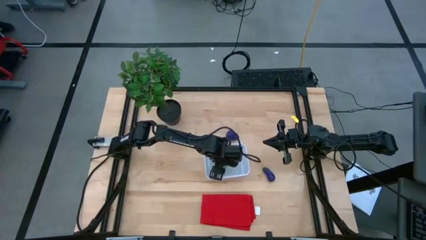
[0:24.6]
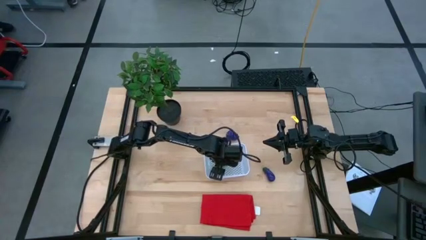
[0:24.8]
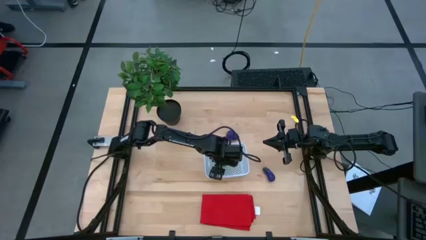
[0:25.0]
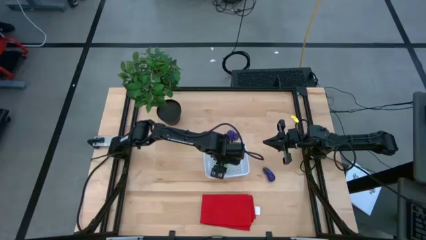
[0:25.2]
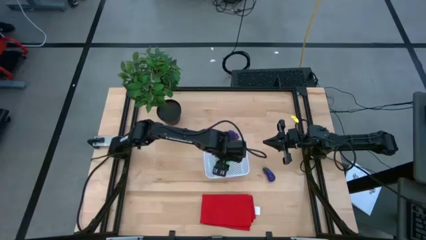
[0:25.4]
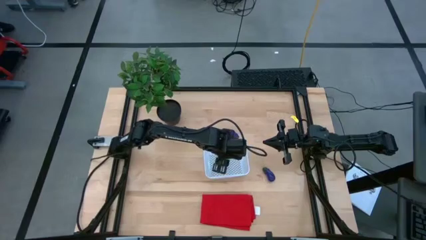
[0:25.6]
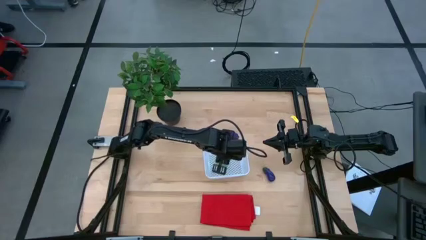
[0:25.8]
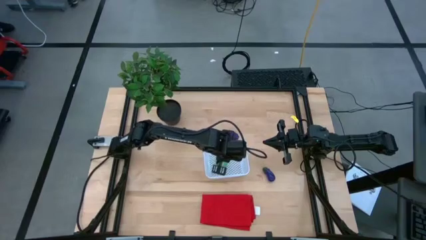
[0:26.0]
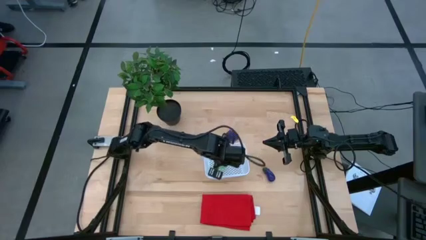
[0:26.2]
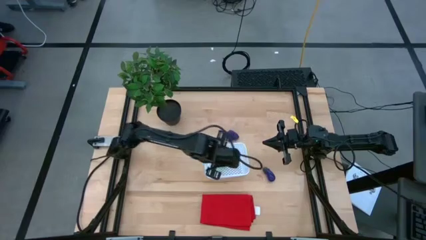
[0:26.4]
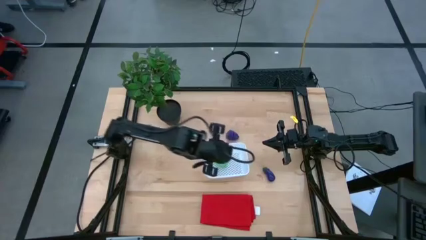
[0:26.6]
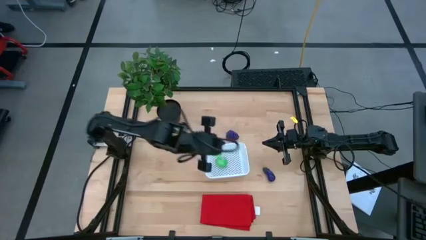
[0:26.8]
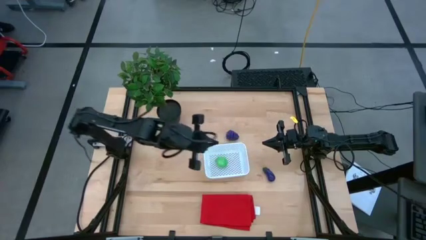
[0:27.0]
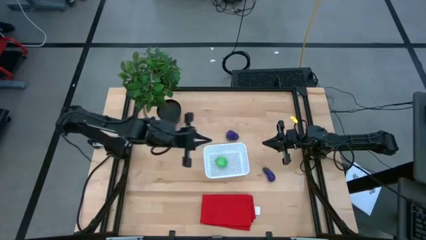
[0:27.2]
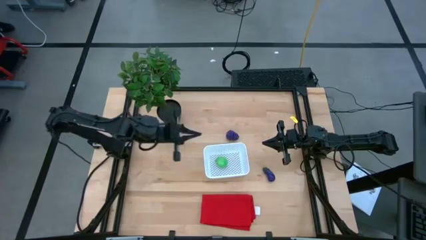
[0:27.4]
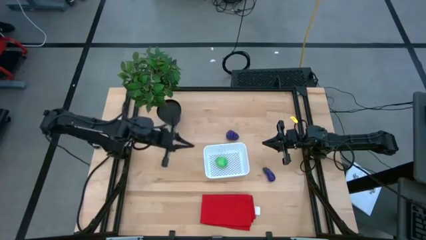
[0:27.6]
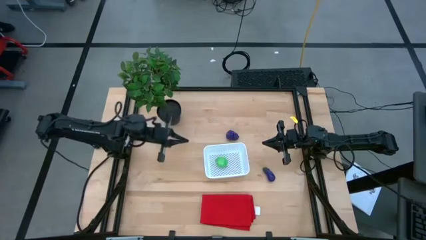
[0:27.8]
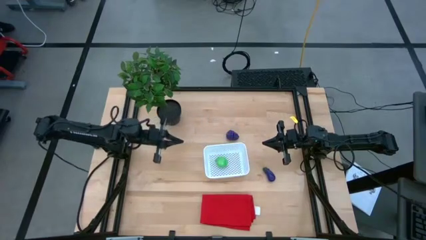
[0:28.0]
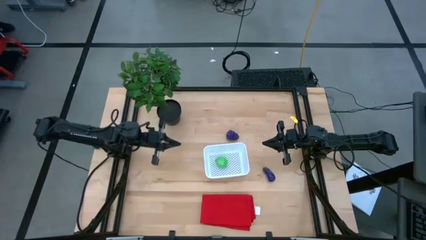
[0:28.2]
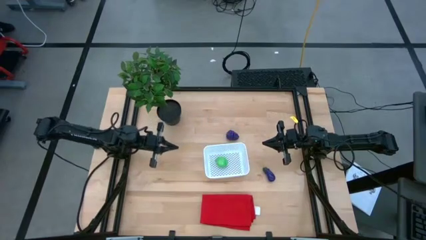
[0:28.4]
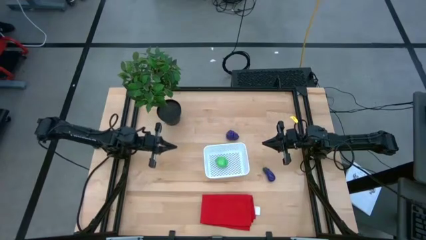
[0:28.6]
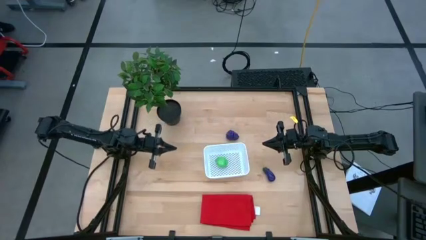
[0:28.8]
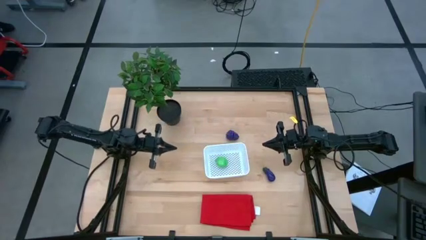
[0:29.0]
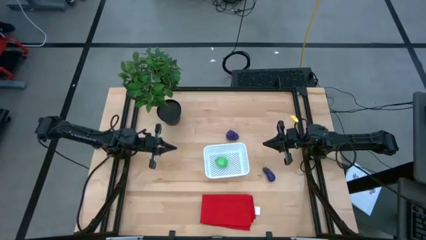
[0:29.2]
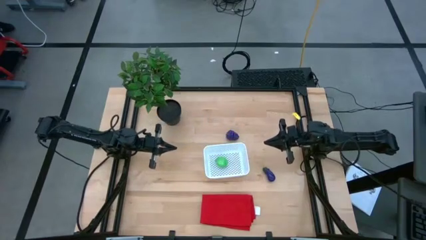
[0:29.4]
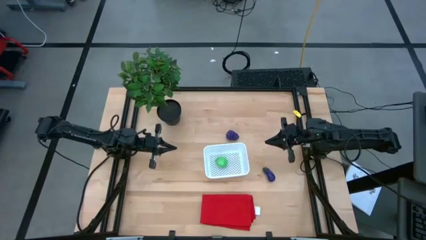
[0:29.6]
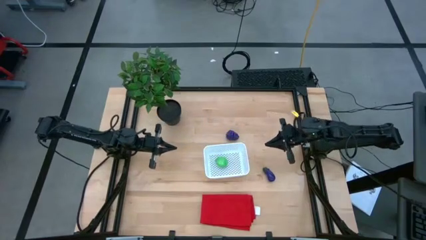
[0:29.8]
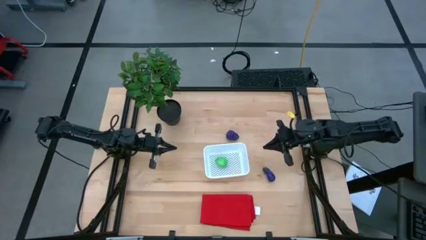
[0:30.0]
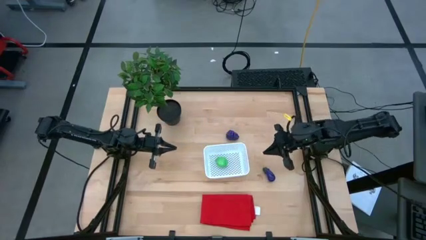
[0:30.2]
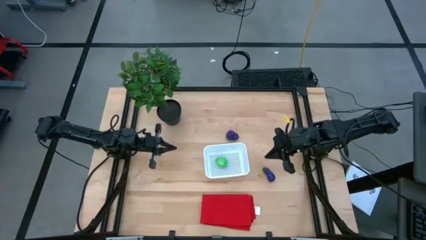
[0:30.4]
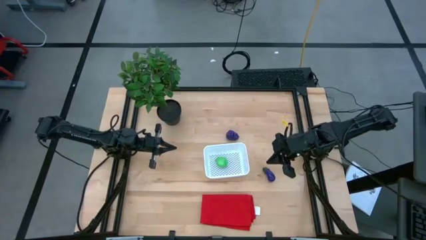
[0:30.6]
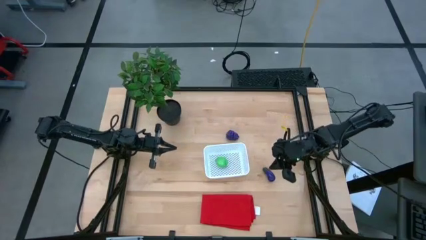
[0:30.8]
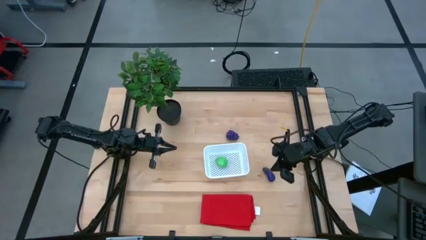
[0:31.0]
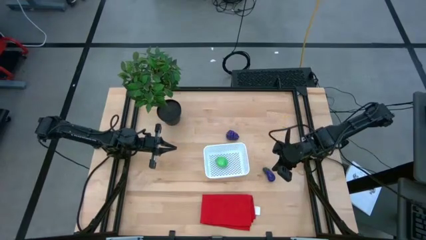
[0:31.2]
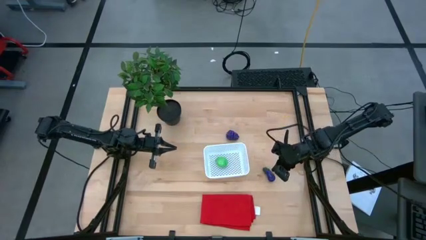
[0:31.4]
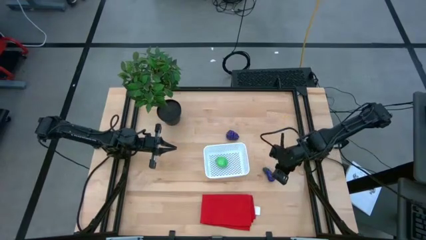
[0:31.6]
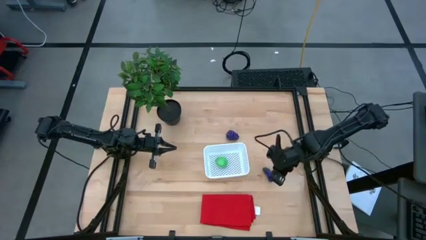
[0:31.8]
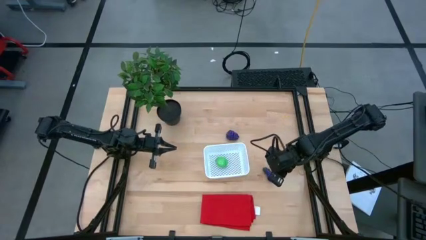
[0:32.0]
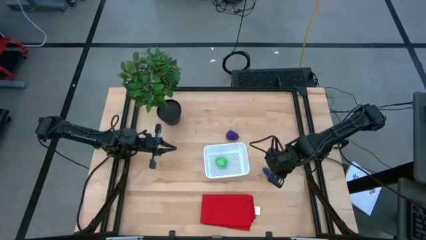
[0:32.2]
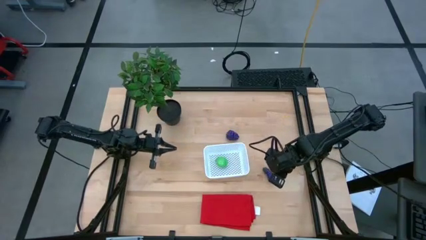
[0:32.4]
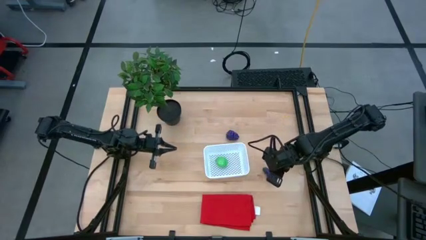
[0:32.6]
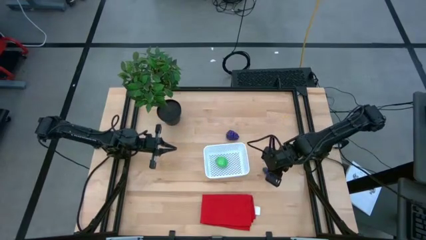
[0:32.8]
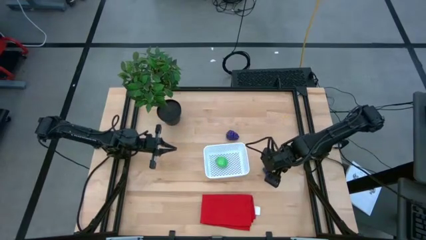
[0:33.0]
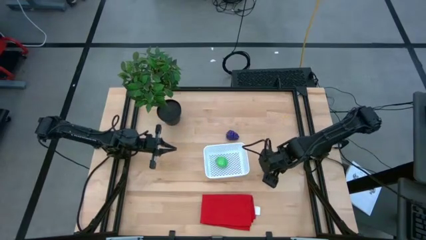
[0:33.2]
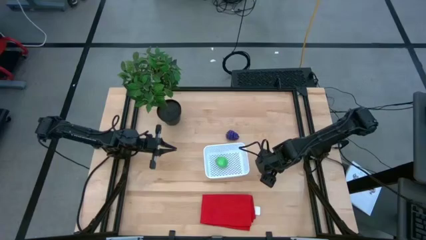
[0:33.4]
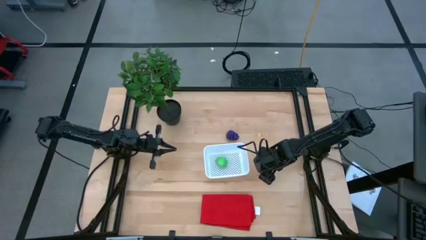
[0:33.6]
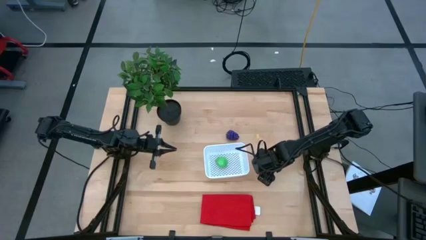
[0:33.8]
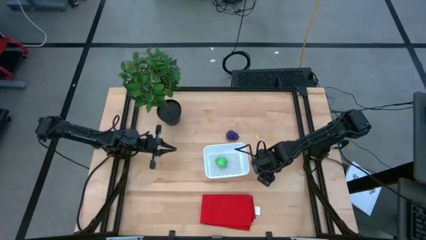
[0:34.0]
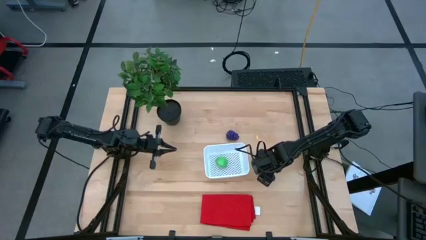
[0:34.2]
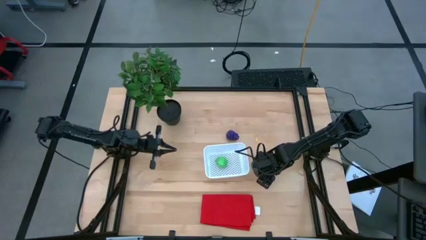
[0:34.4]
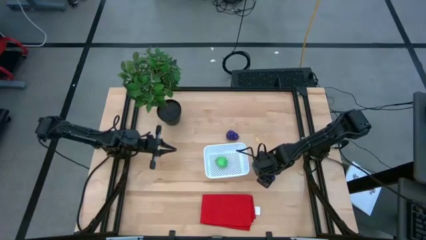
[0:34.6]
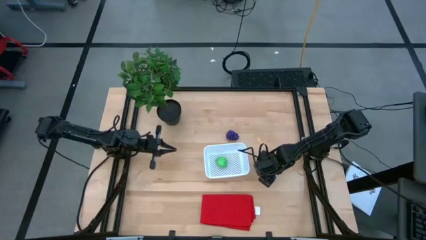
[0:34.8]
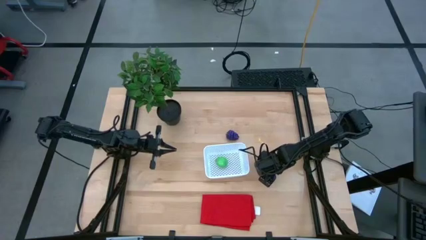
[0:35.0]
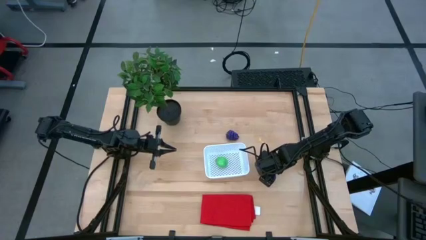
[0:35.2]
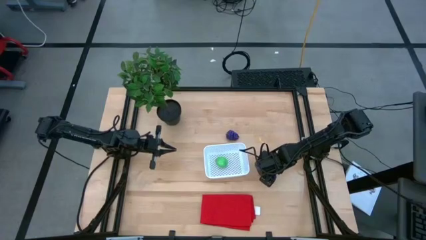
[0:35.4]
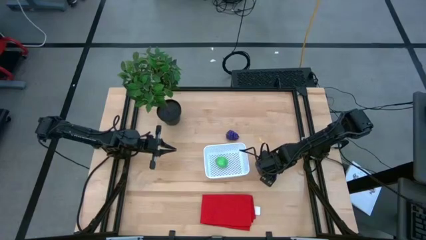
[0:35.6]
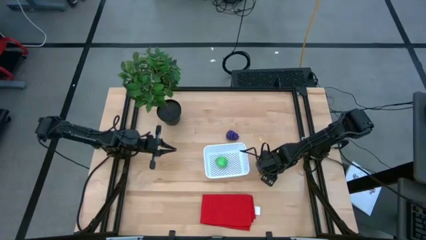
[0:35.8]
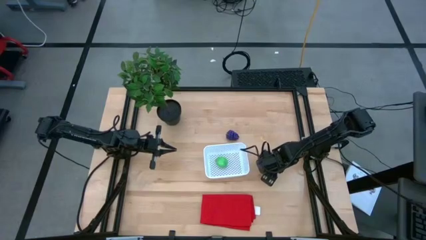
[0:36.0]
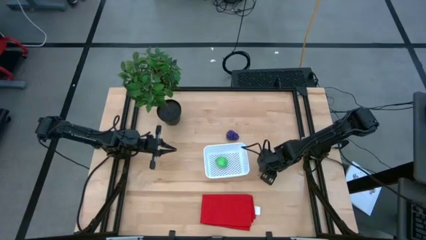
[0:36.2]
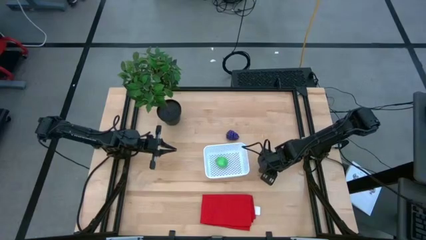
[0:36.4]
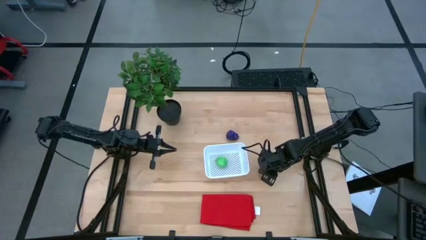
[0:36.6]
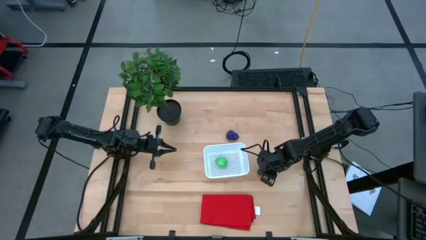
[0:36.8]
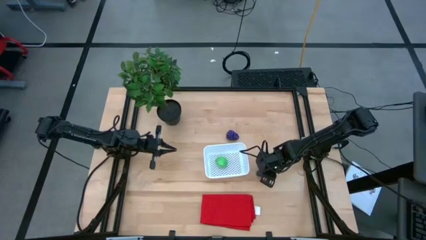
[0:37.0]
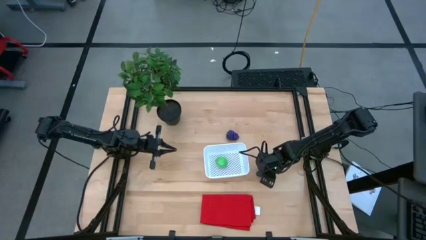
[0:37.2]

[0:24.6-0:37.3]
Task: Pick and placing Produce into tupperware
Put the violet eggplant into the white bin
